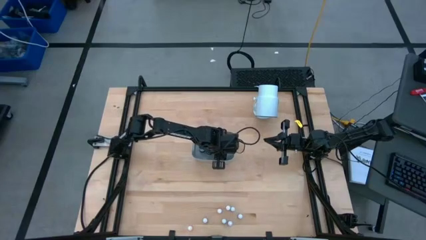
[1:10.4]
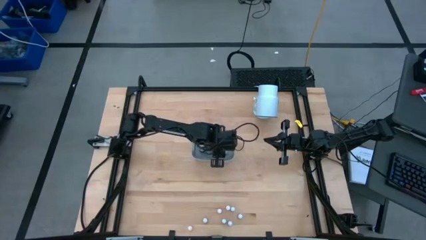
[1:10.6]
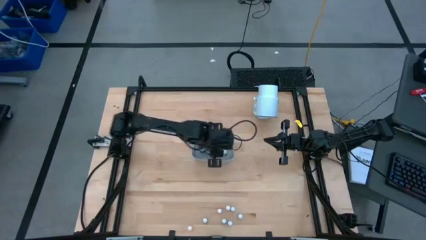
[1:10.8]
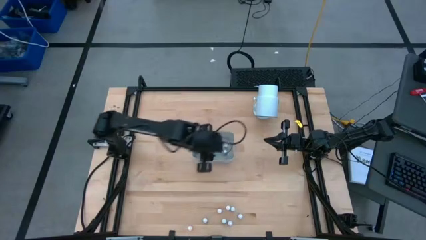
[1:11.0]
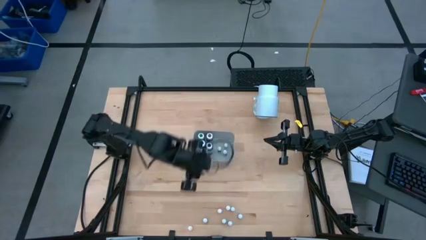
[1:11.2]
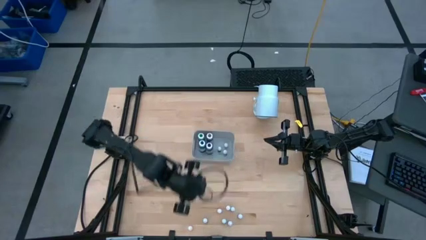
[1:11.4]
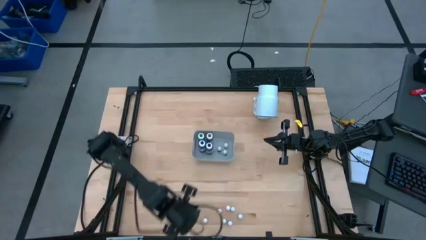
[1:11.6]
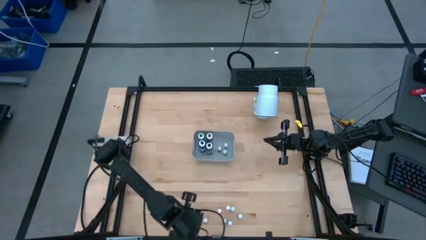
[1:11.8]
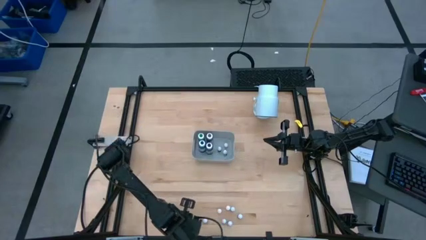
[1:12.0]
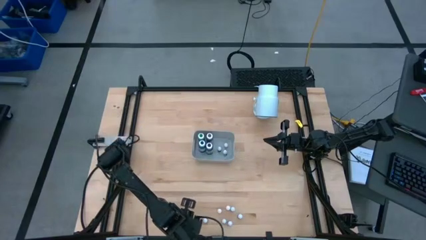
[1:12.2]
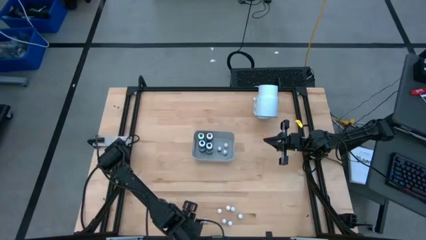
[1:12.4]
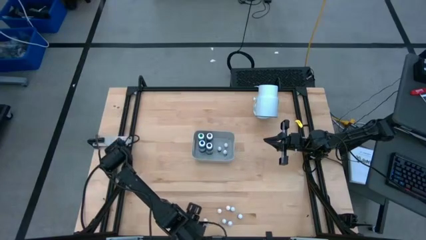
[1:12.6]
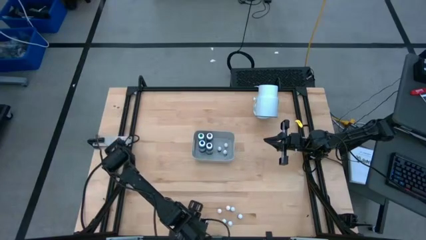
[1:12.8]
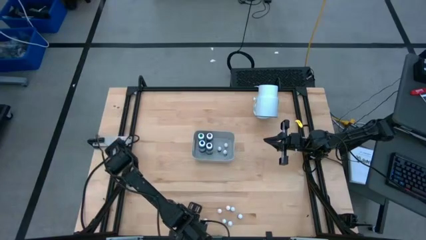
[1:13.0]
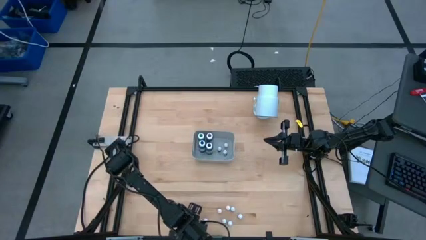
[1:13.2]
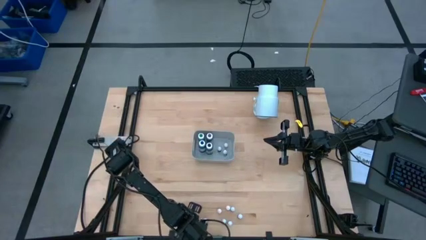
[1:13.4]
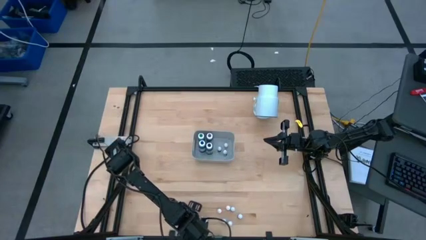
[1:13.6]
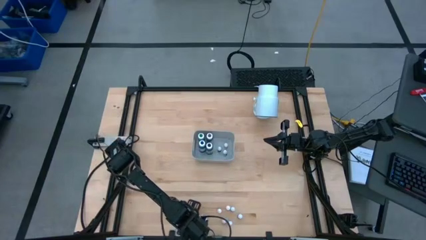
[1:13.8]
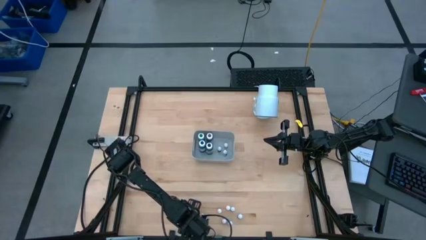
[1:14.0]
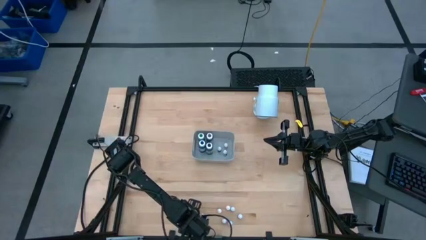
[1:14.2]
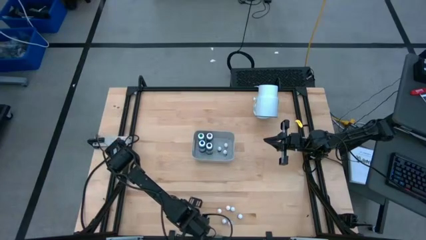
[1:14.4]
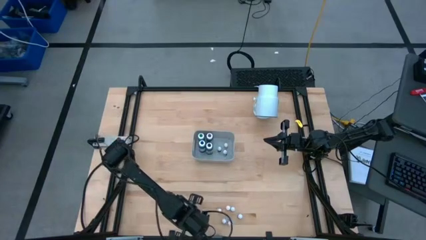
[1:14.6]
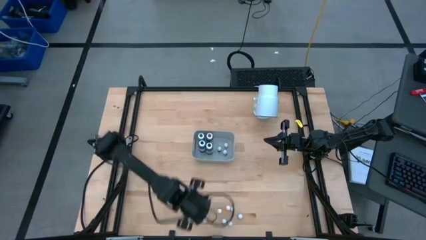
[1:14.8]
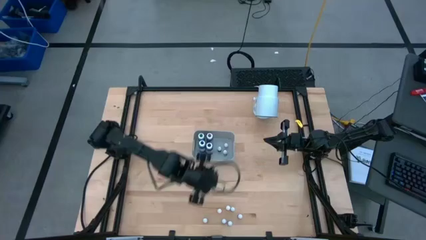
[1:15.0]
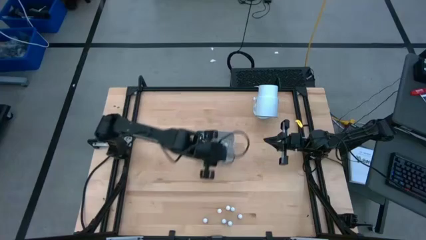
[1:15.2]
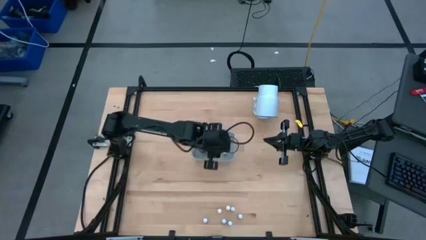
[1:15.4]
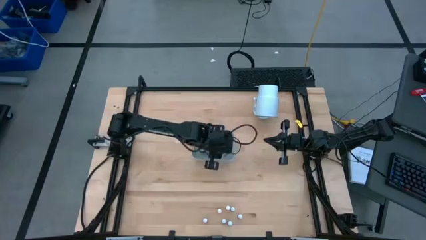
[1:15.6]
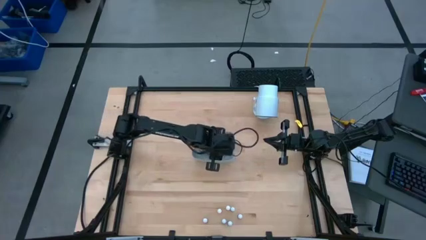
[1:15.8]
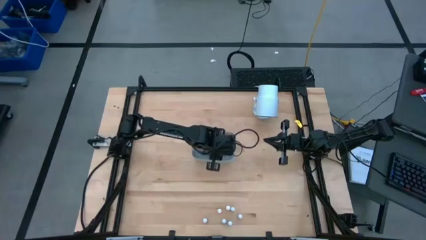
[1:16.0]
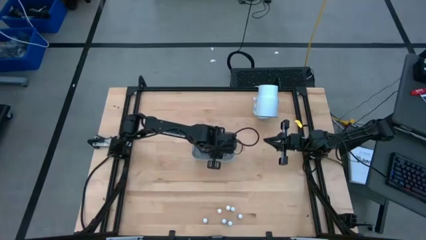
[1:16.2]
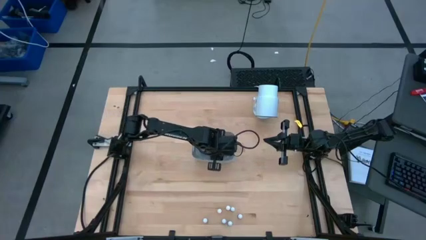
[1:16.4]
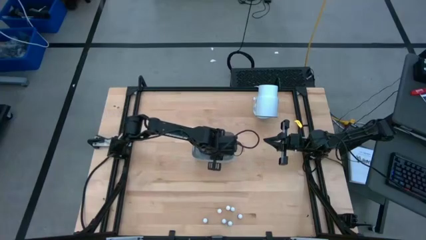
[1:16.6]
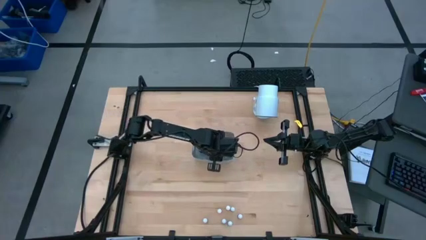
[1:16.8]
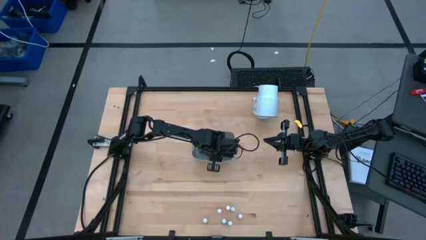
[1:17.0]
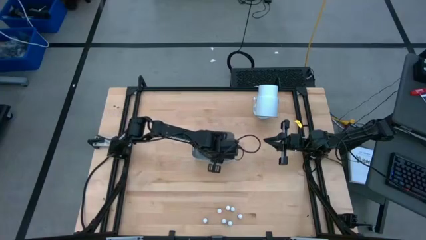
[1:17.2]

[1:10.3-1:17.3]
Task: Pick & Place food coloring
Put the small yellow food coloring bottle into the gray bin

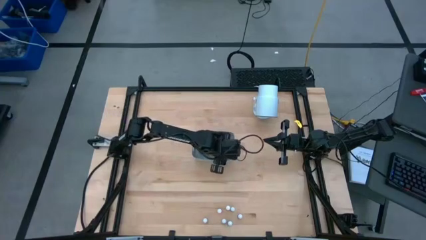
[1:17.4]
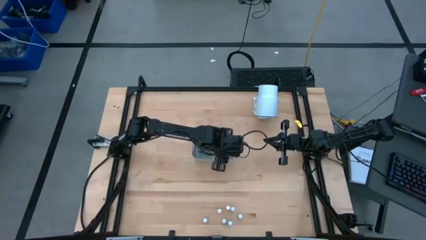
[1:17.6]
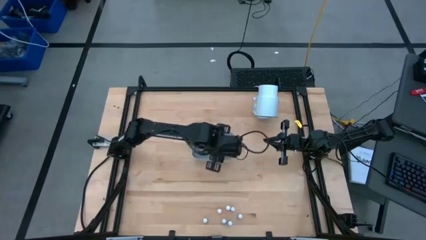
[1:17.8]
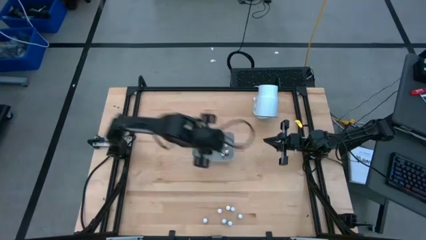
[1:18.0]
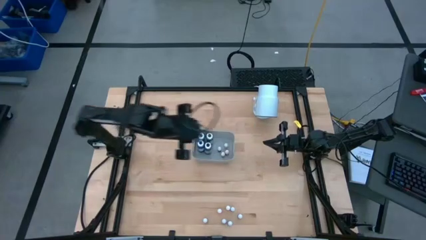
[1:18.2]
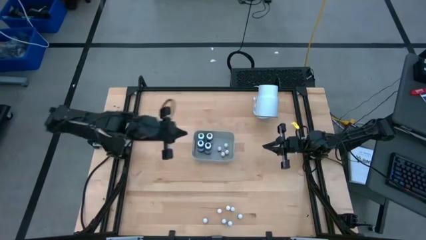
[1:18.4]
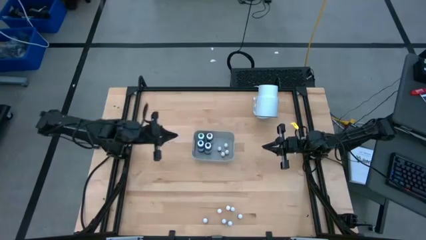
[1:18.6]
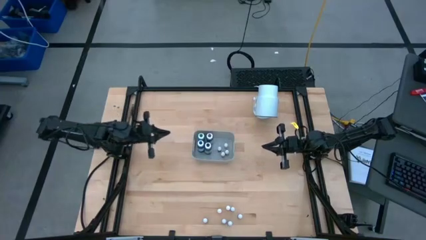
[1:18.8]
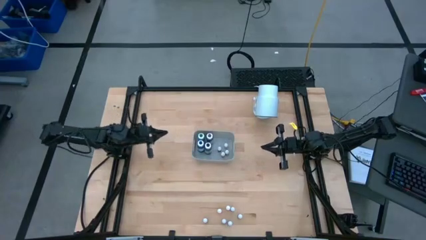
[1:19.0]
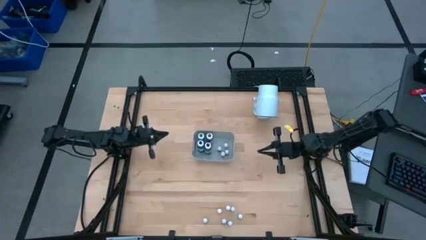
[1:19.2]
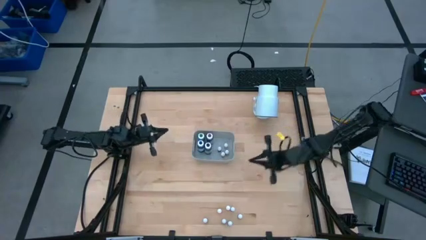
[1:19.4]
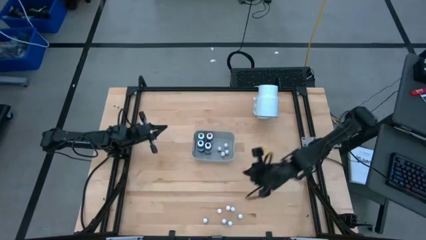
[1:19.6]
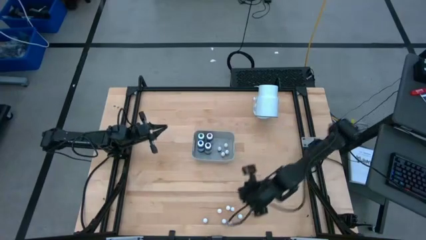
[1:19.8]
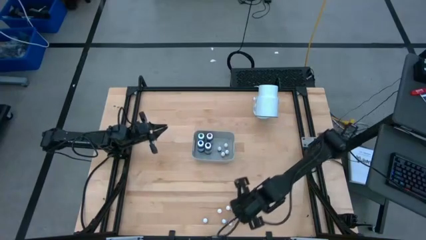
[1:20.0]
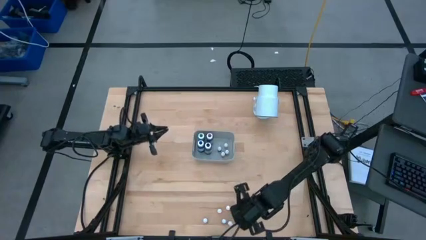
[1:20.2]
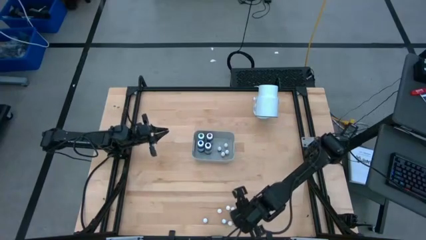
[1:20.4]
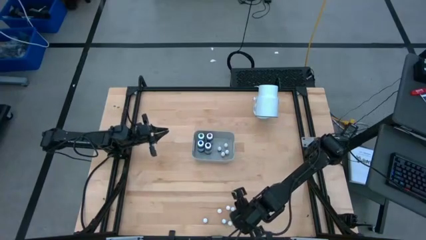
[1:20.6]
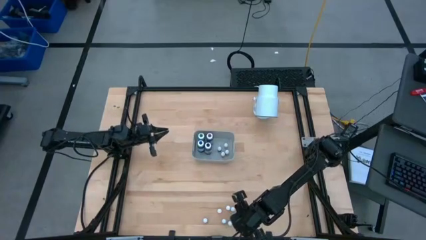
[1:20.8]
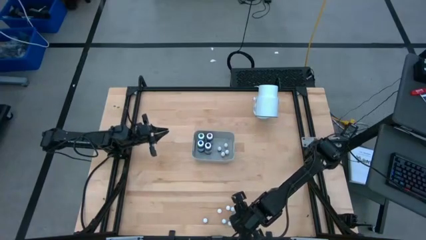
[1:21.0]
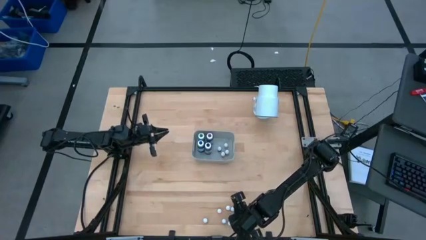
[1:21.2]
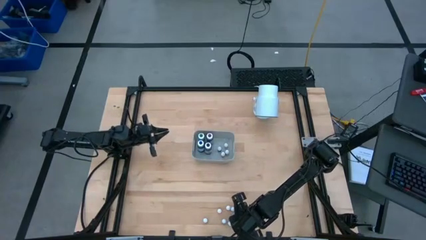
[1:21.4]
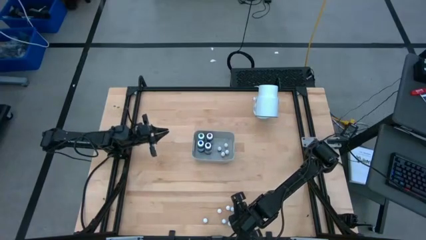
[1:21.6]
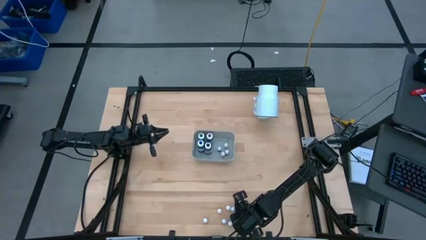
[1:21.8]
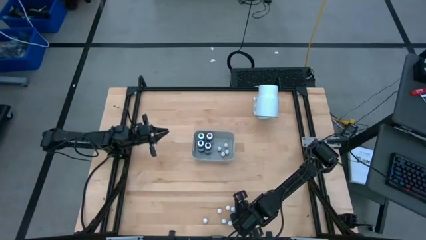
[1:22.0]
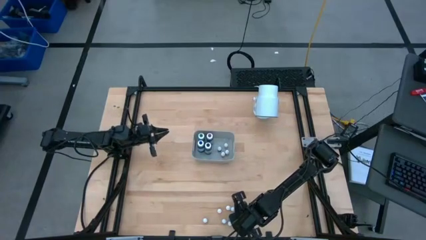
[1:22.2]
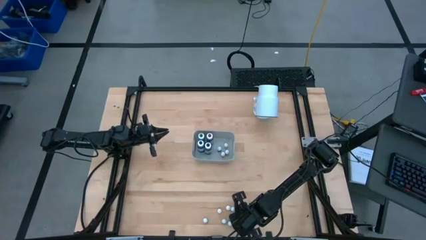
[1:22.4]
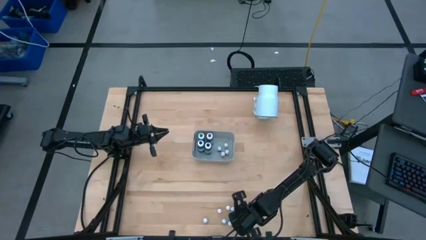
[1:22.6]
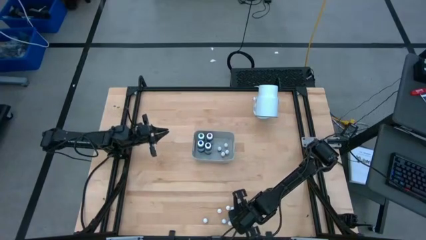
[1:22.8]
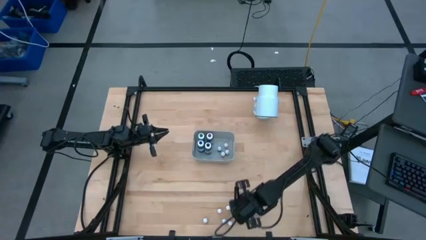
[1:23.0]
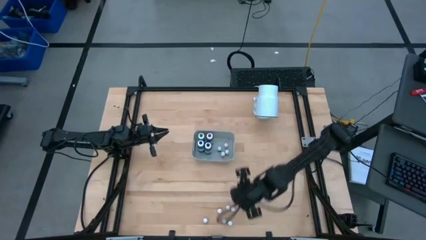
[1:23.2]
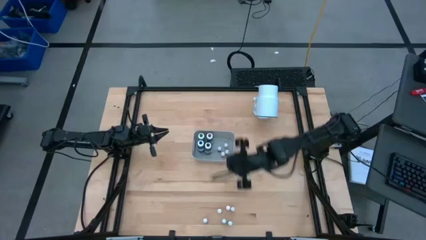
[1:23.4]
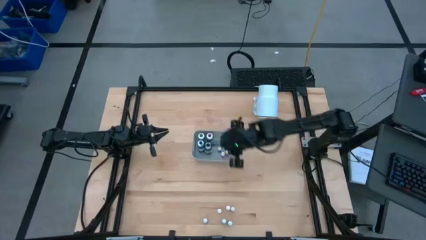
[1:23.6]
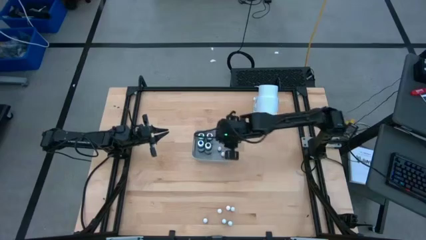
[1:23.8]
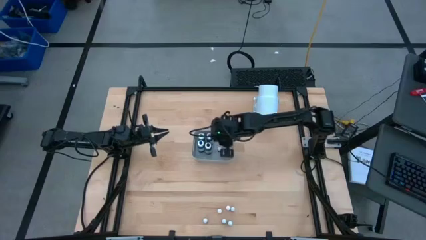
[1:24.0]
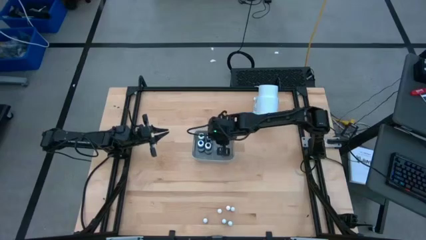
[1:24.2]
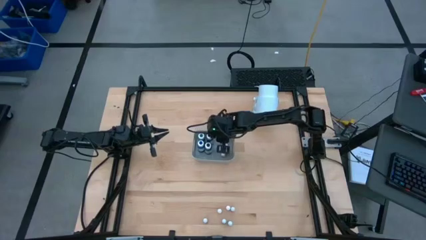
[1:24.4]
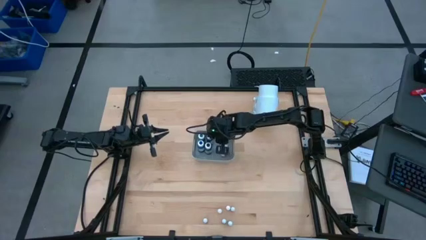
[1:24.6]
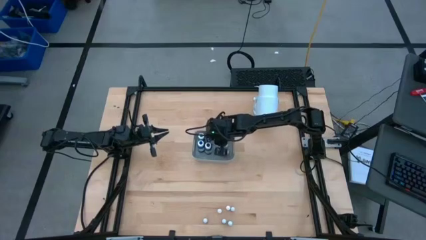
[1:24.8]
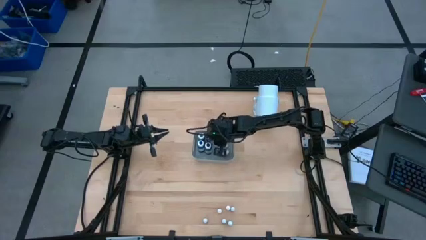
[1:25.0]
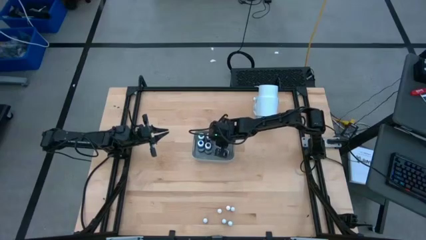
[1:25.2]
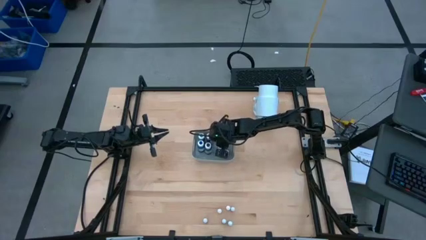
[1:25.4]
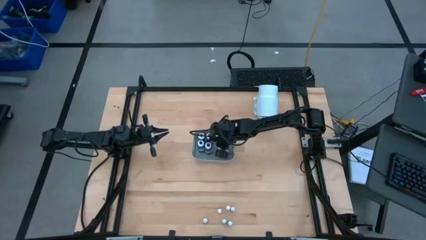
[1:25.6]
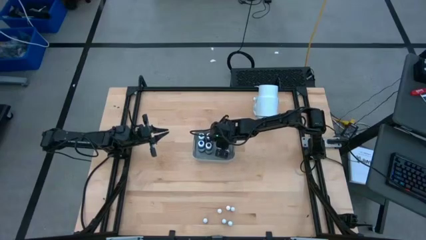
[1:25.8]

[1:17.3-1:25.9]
Put the small violet food coloring bottle into the gray bin

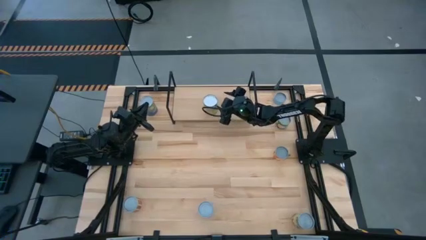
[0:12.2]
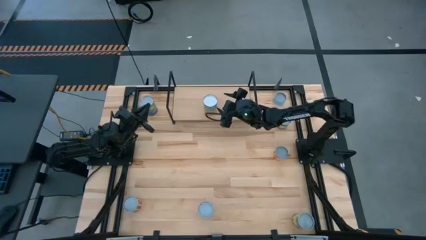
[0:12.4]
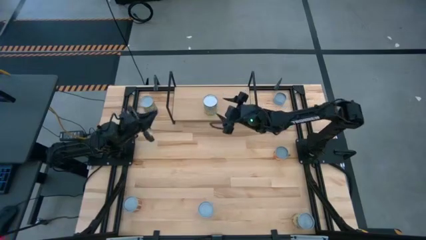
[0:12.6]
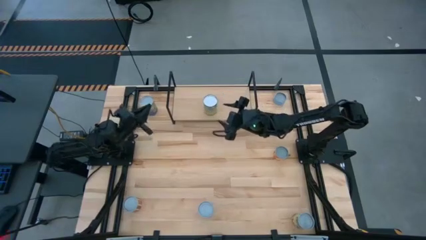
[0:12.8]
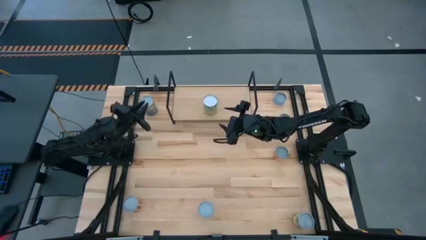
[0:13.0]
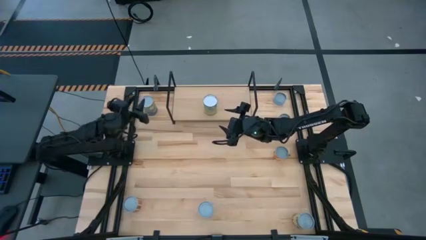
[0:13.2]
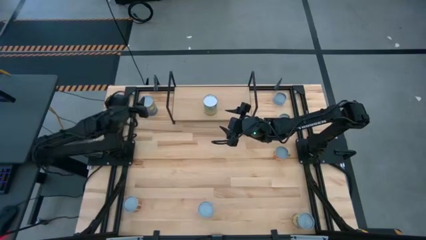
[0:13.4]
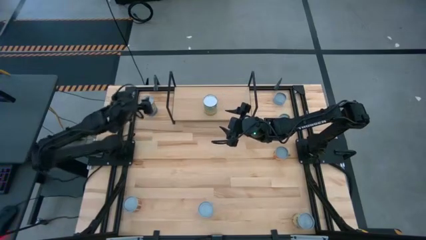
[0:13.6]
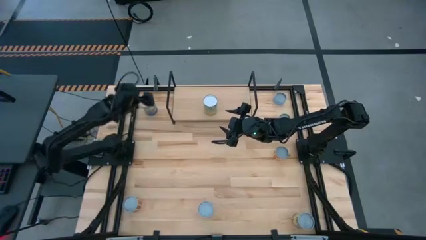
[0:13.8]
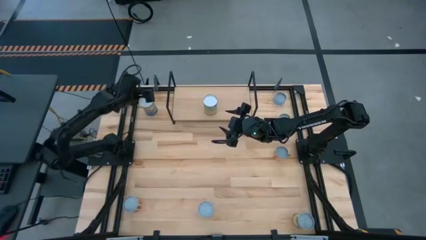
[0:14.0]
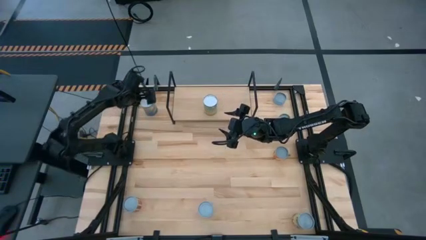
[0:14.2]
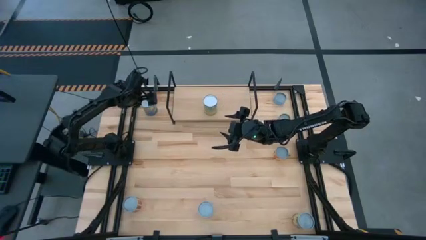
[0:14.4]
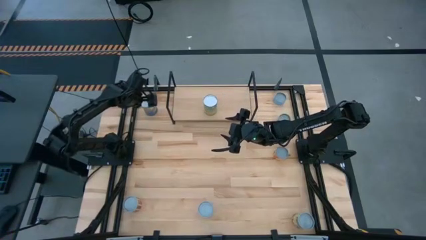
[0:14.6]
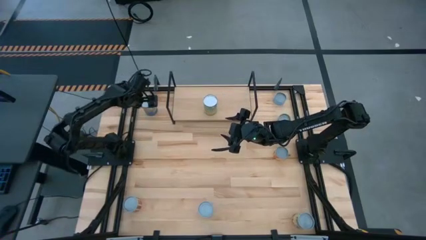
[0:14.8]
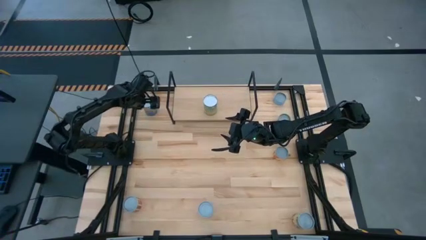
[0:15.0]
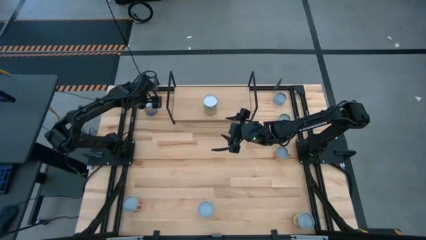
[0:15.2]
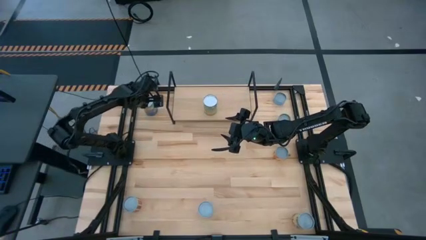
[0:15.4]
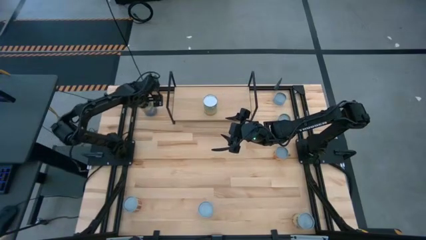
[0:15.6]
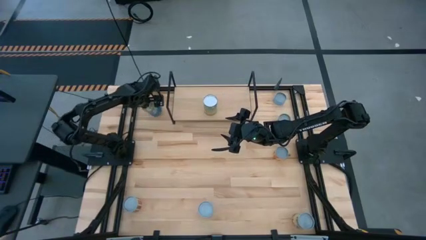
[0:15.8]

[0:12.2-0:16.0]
Task: Pick and place cans onto a shelf
Put the canned carrots on the shelf
